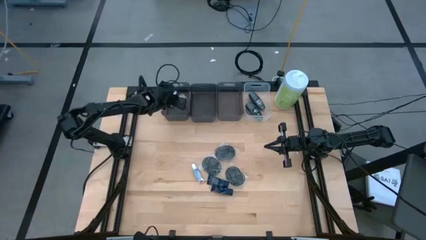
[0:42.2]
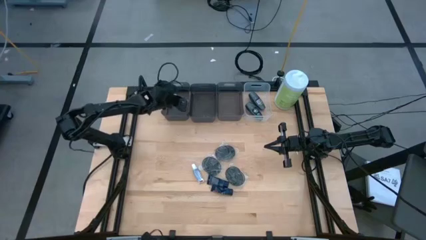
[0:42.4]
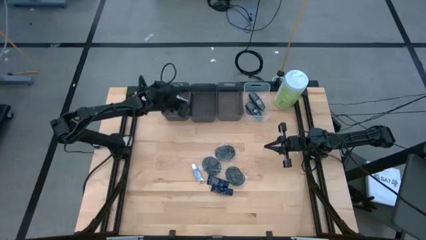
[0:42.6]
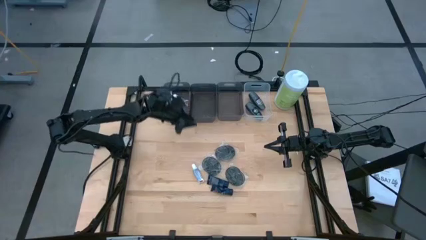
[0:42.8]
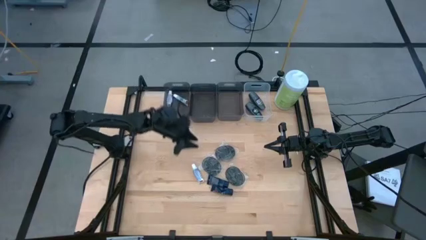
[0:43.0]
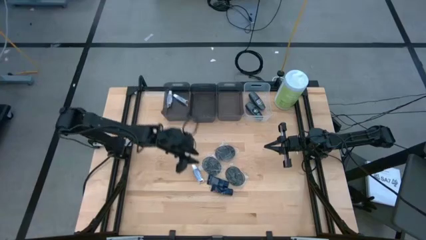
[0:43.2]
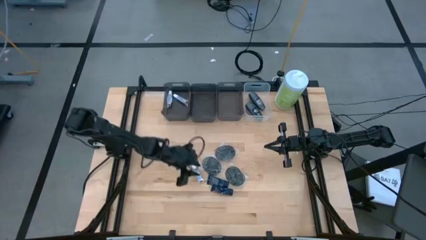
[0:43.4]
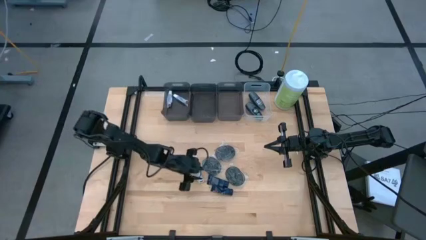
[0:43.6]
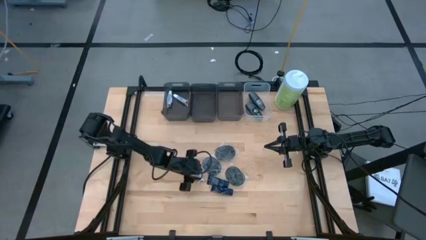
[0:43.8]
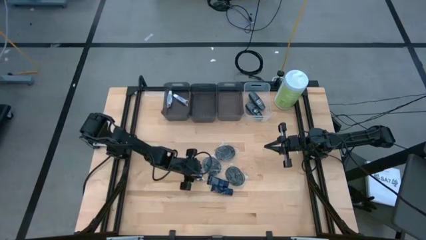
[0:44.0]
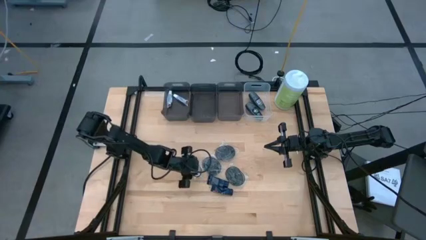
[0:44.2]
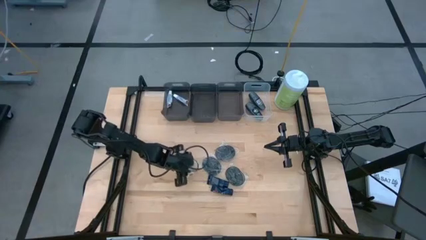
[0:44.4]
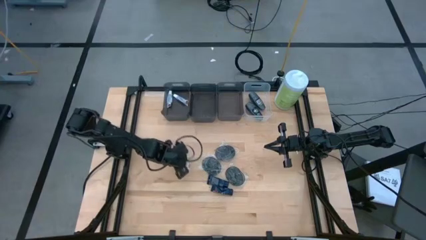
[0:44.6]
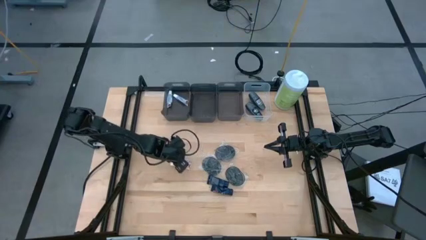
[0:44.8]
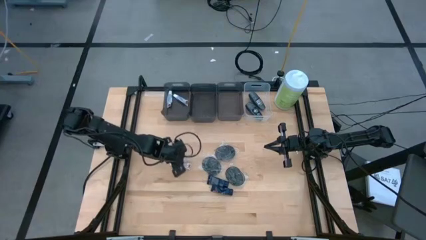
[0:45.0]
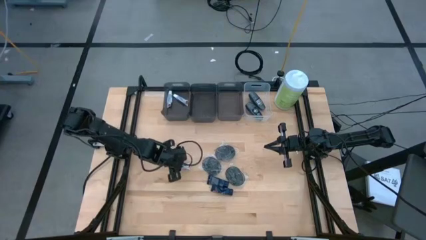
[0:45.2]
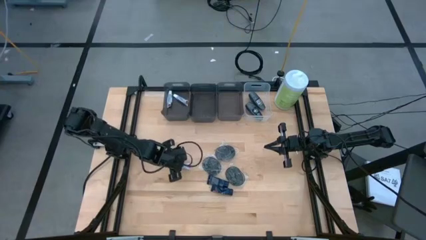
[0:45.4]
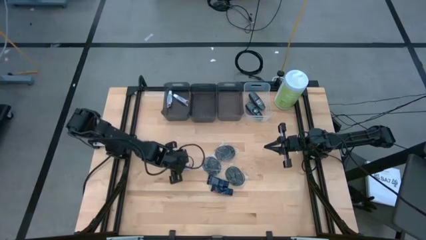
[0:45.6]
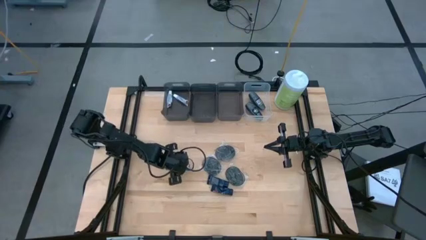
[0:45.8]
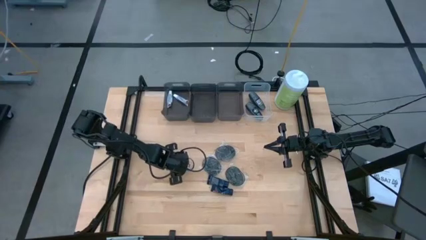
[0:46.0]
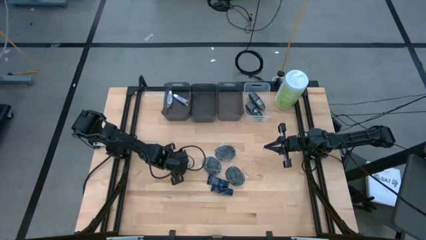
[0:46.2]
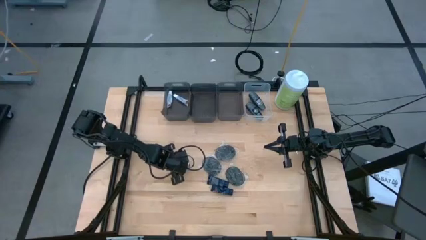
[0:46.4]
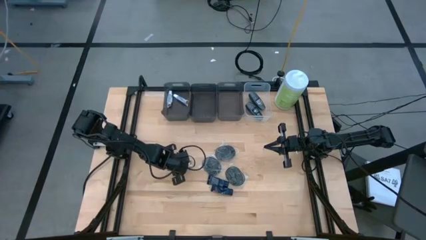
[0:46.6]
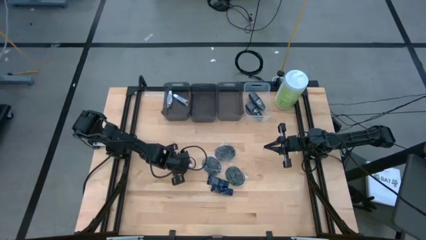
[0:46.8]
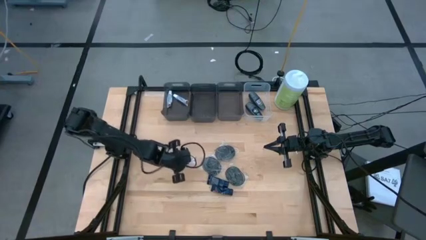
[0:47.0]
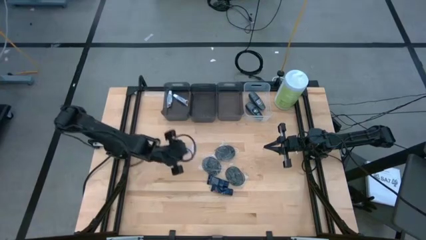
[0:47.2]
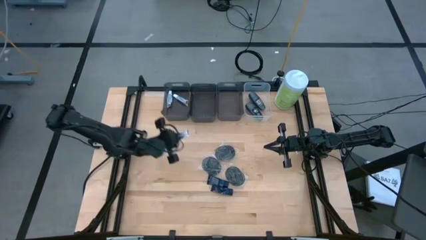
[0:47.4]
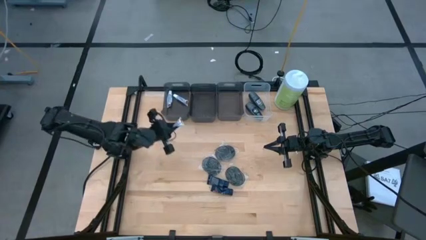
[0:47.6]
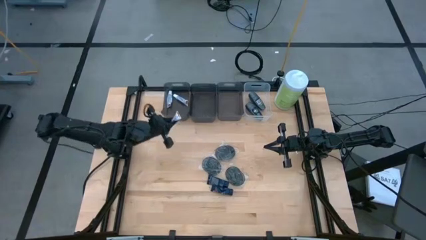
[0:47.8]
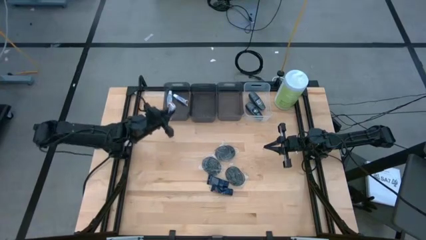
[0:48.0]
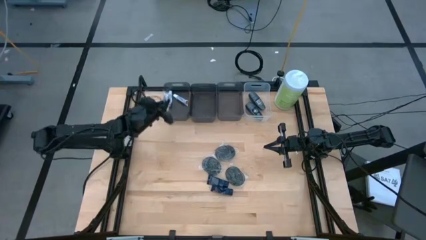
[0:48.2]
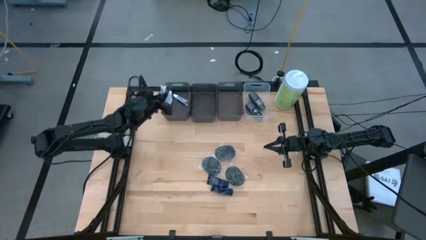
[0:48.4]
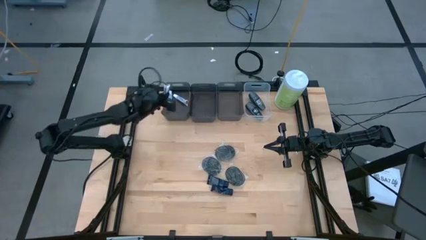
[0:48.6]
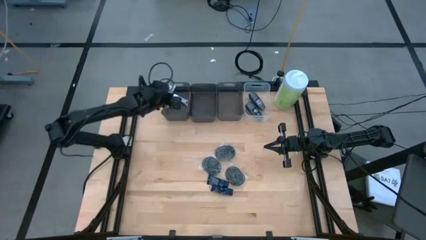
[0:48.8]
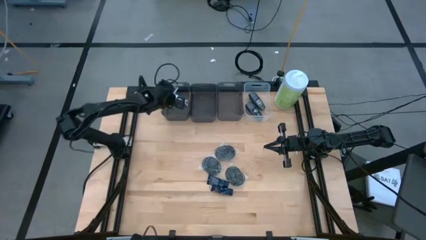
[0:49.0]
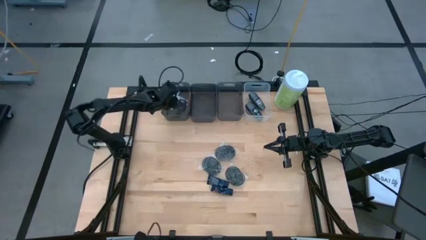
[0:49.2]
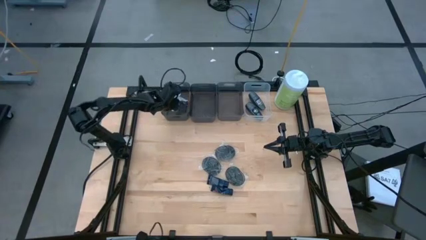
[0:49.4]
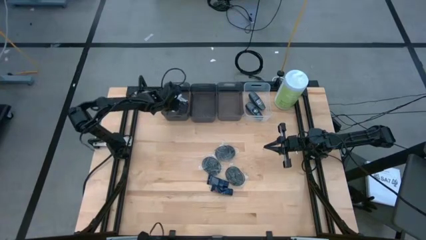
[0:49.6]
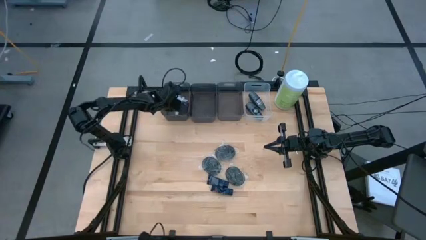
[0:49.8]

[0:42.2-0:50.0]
Task: Pick & Place Travel size toiletries
Put the toothpaste into the left black bin

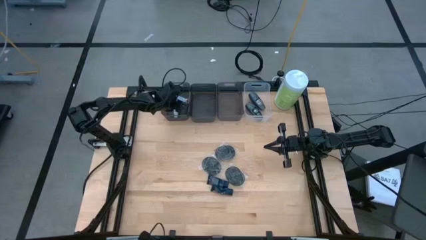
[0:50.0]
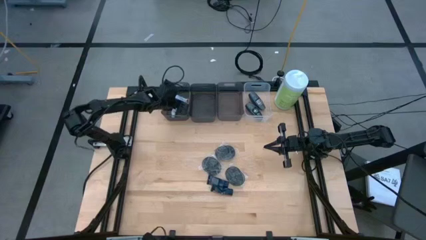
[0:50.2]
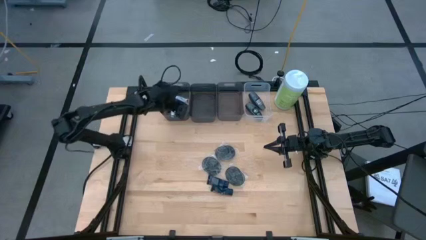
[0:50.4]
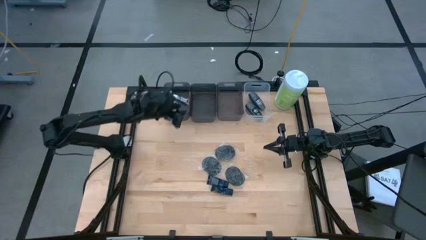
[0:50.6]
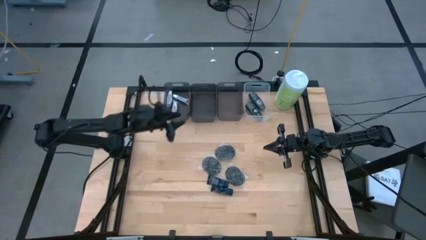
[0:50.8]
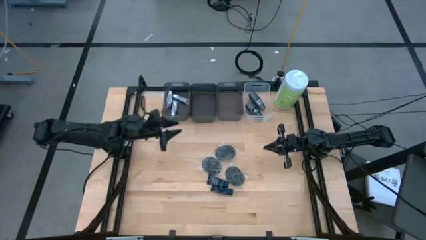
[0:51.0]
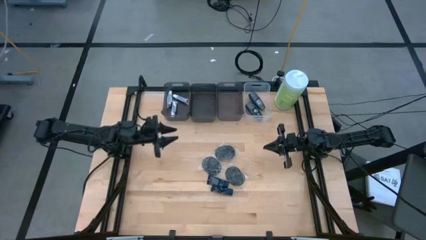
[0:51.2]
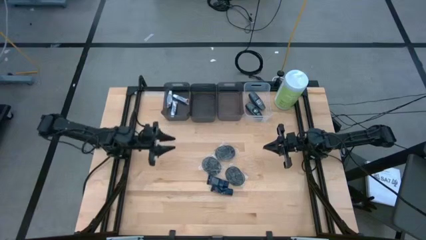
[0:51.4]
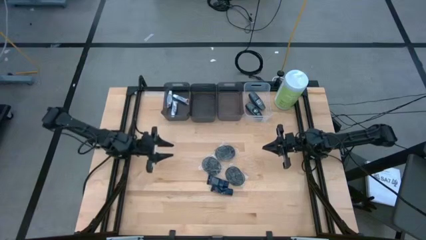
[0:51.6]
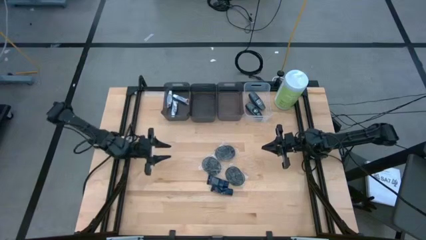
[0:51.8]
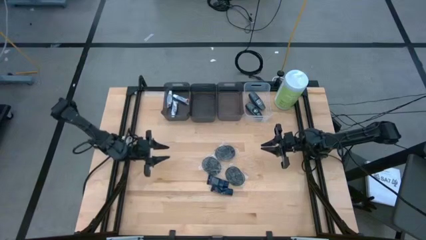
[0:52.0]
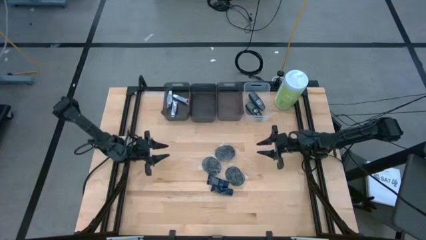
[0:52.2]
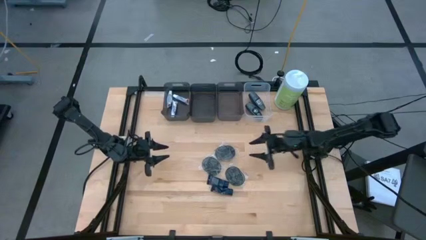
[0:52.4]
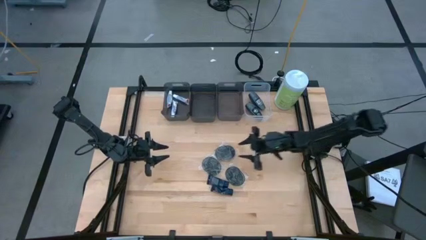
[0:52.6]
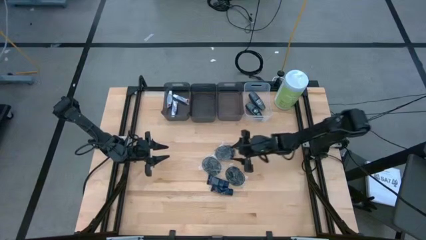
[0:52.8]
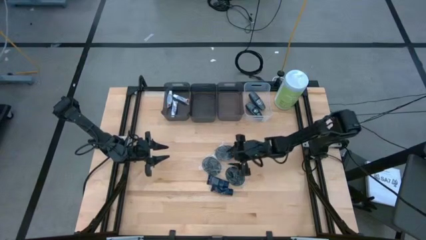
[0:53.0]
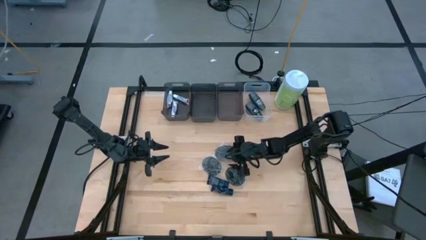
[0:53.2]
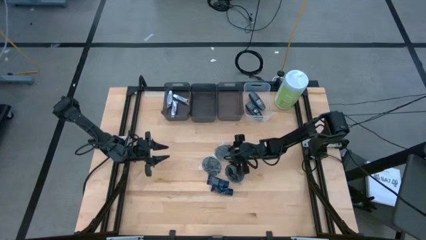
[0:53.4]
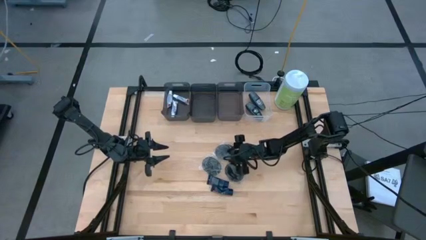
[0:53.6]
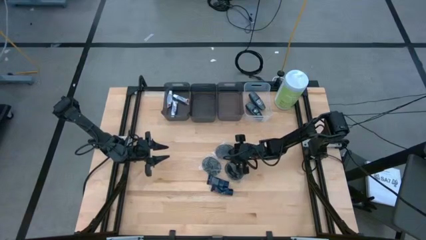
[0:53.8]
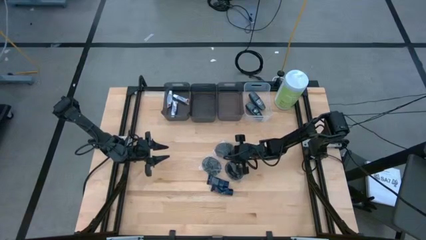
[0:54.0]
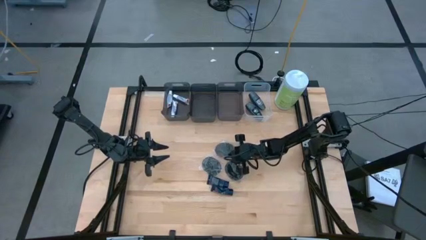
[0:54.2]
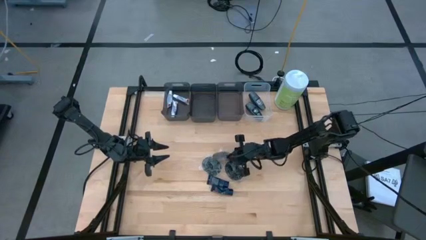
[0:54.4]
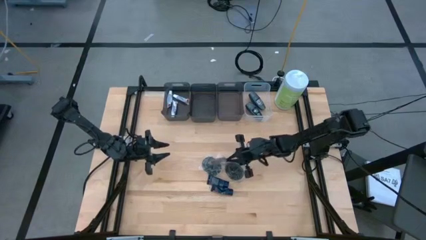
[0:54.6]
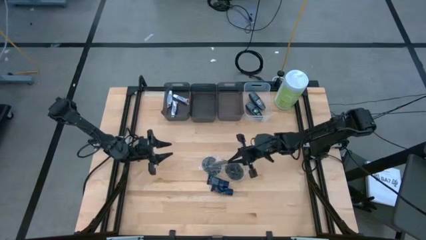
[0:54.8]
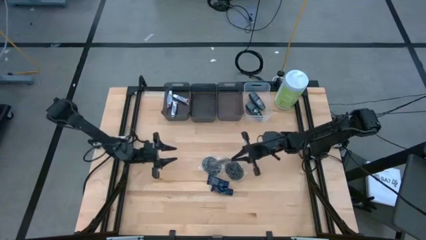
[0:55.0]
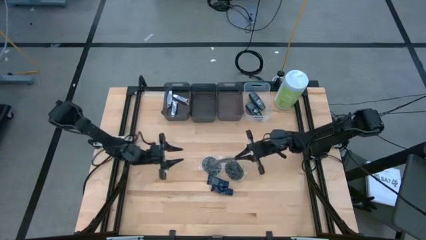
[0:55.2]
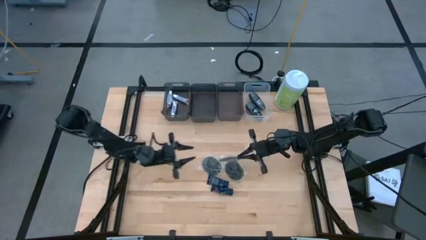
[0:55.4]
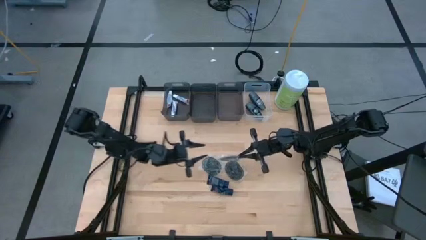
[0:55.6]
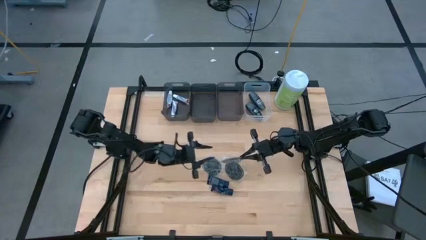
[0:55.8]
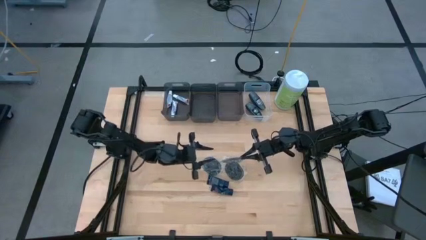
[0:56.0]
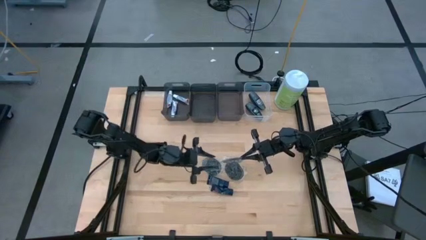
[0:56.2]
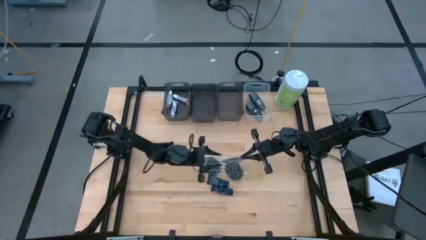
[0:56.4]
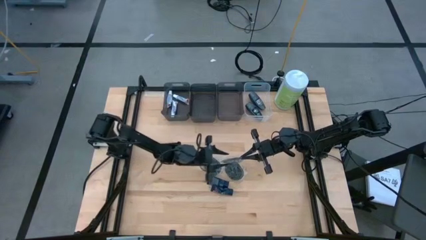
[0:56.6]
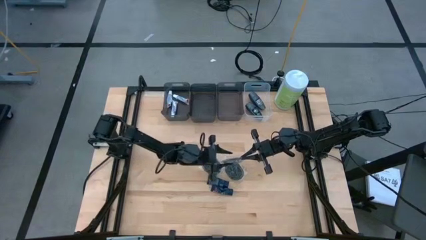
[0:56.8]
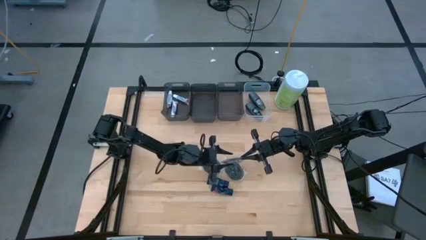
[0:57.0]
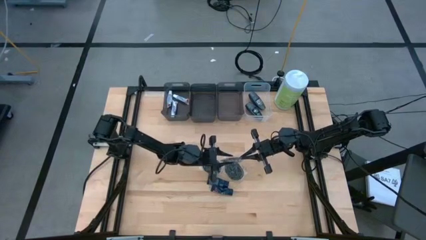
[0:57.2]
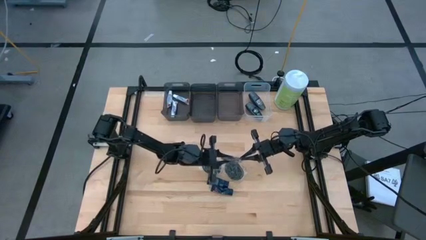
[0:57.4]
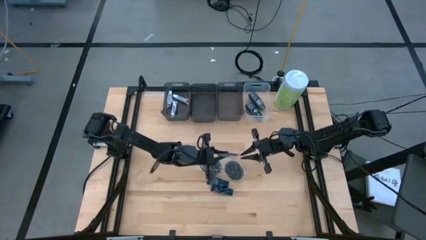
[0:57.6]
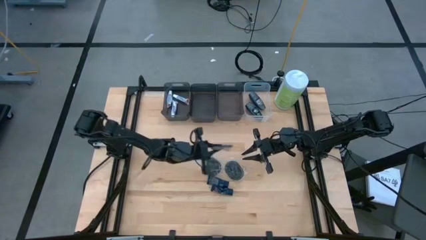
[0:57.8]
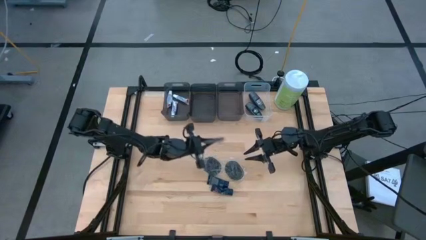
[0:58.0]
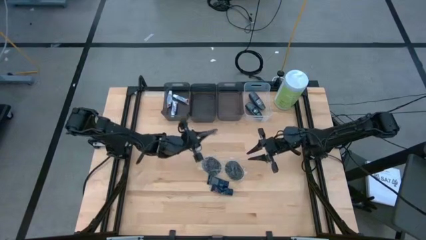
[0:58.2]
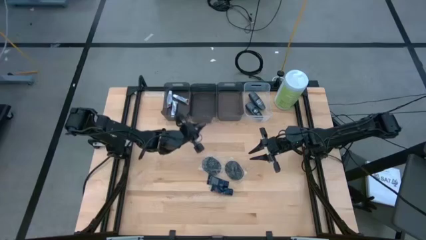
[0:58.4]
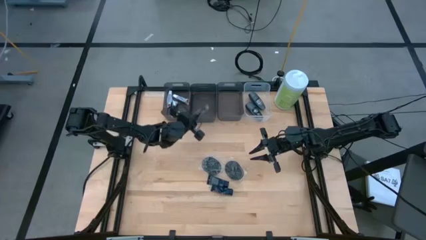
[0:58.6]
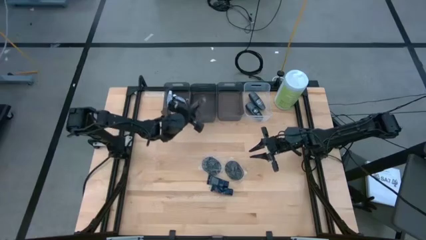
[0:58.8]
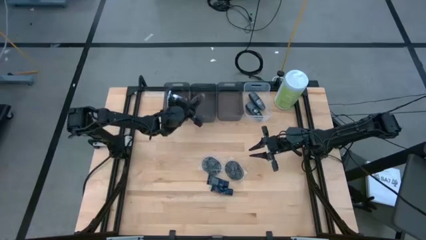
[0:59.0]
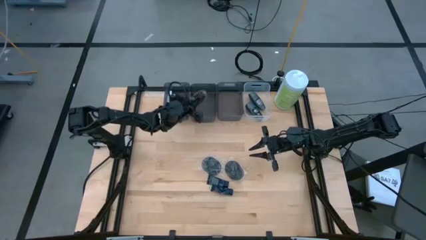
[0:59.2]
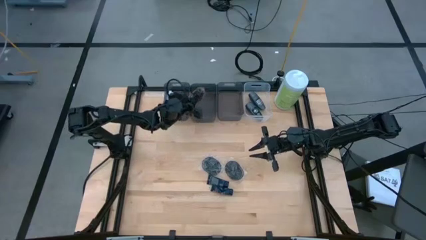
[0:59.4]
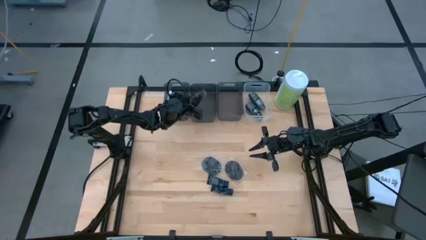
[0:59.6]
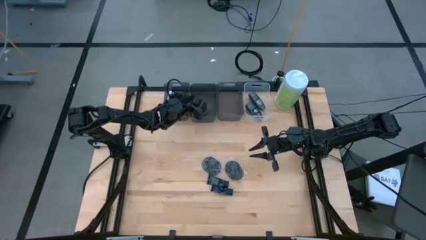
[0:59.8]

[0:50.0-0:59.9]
Put the top hairbrush into the middle black bin
